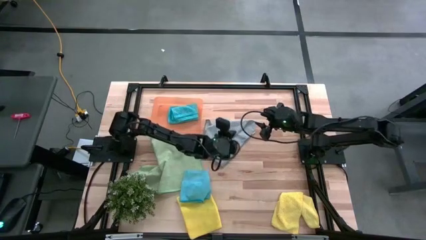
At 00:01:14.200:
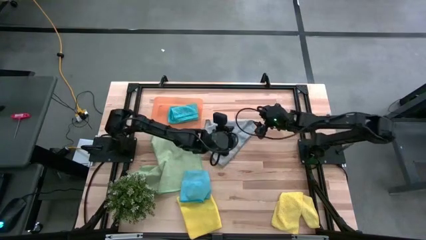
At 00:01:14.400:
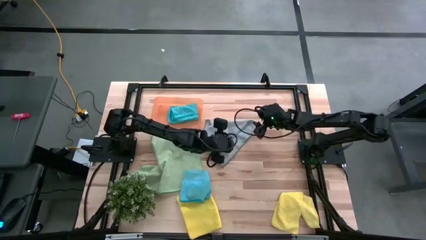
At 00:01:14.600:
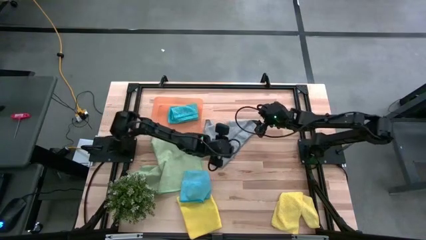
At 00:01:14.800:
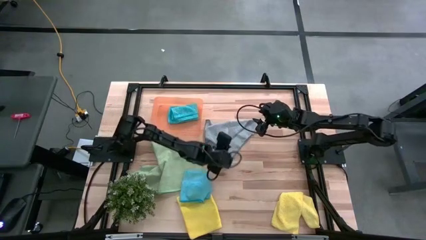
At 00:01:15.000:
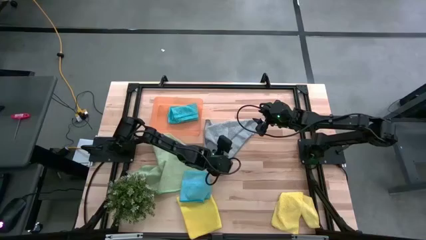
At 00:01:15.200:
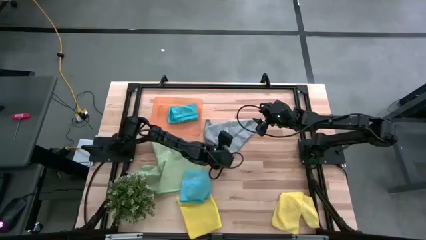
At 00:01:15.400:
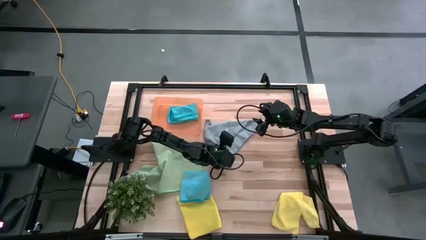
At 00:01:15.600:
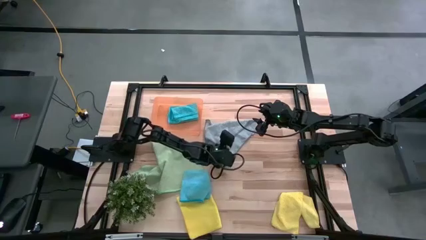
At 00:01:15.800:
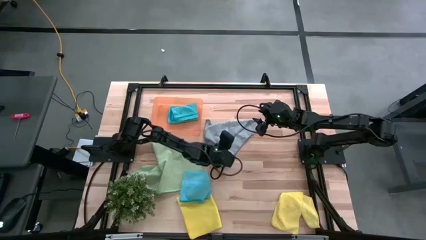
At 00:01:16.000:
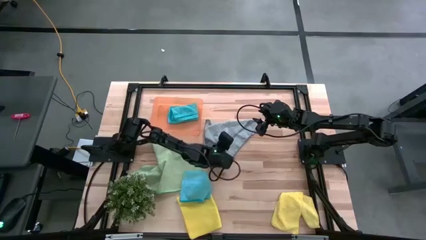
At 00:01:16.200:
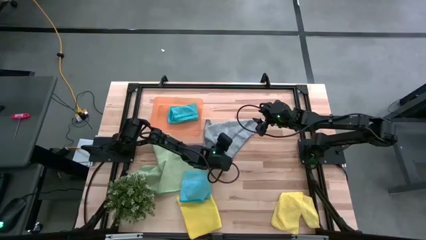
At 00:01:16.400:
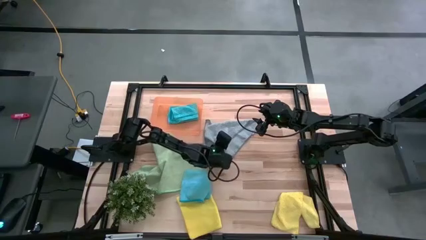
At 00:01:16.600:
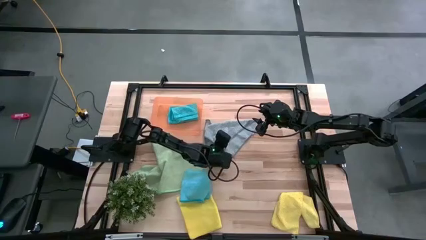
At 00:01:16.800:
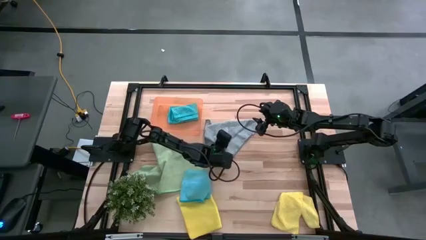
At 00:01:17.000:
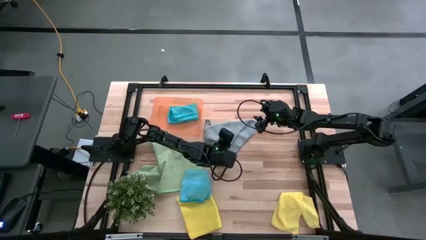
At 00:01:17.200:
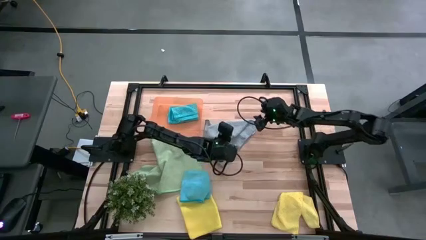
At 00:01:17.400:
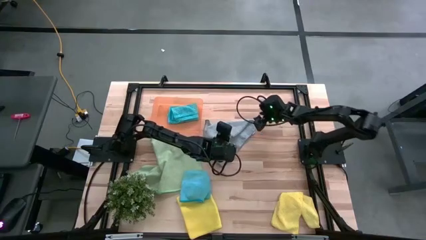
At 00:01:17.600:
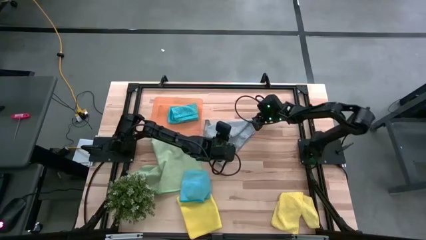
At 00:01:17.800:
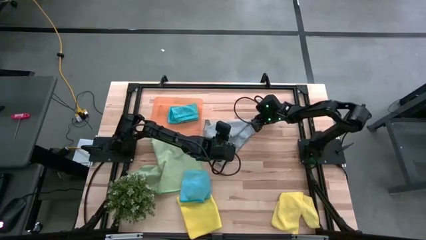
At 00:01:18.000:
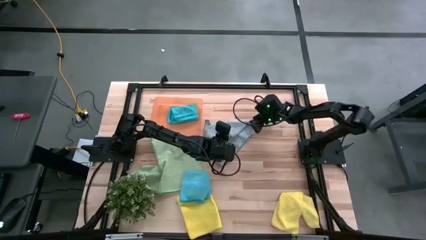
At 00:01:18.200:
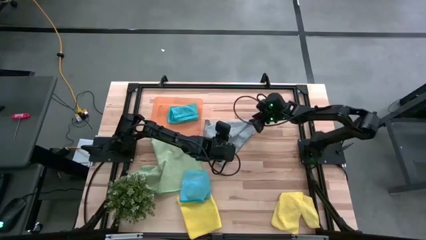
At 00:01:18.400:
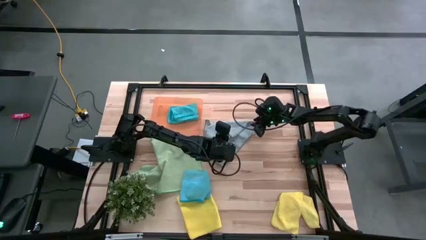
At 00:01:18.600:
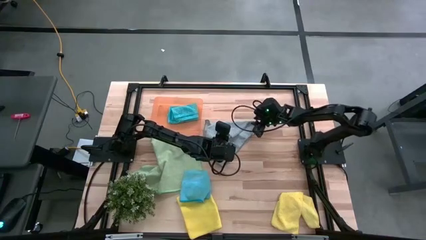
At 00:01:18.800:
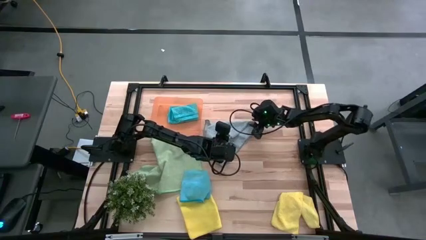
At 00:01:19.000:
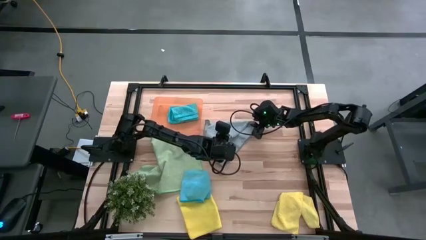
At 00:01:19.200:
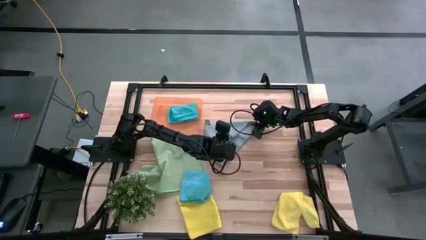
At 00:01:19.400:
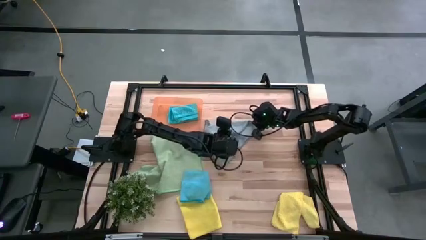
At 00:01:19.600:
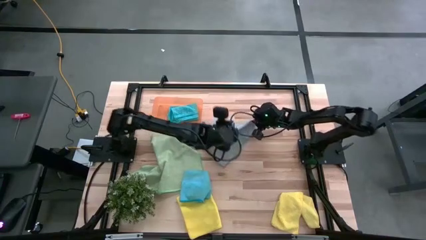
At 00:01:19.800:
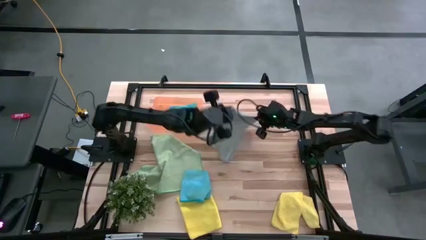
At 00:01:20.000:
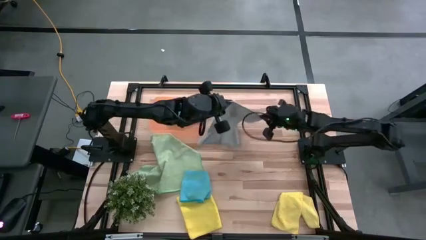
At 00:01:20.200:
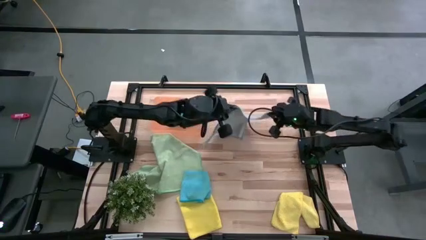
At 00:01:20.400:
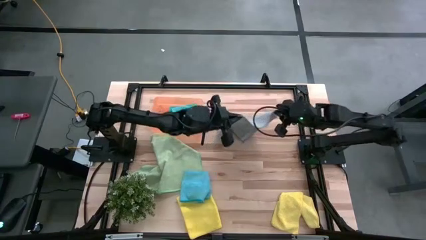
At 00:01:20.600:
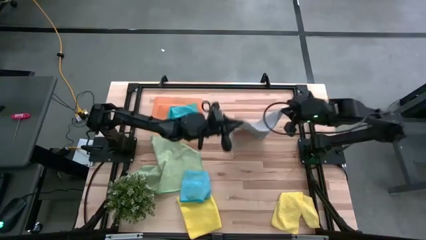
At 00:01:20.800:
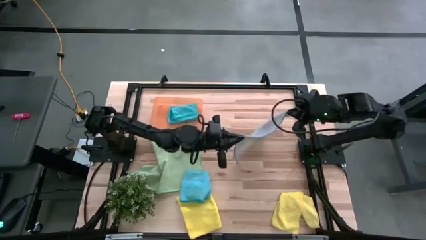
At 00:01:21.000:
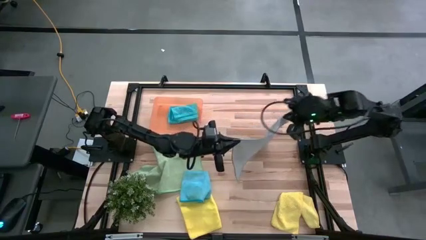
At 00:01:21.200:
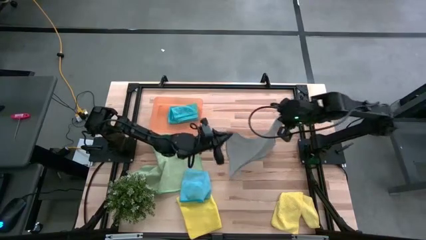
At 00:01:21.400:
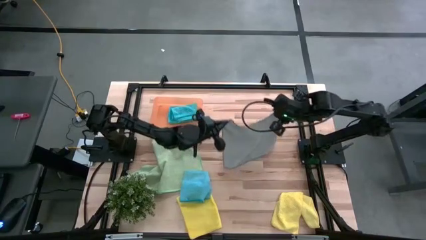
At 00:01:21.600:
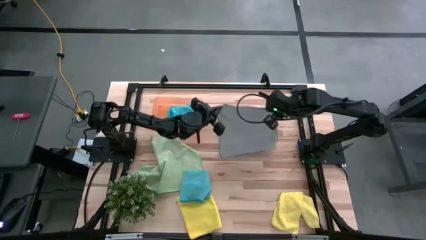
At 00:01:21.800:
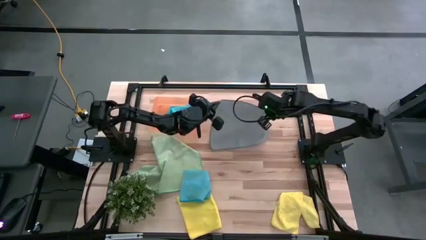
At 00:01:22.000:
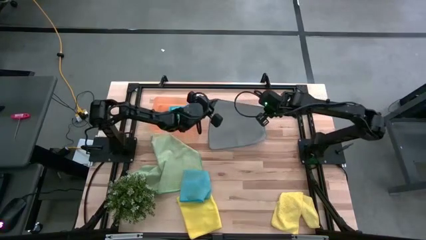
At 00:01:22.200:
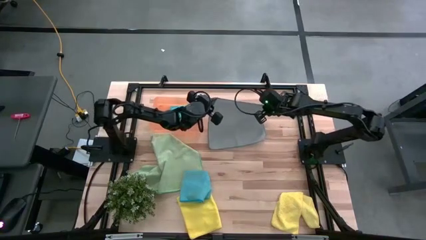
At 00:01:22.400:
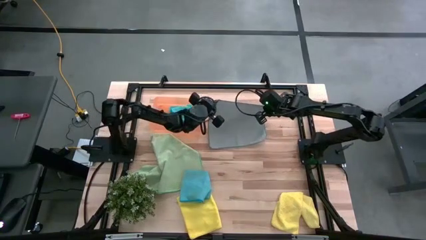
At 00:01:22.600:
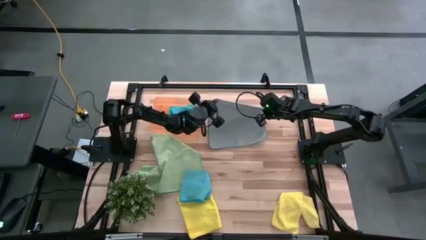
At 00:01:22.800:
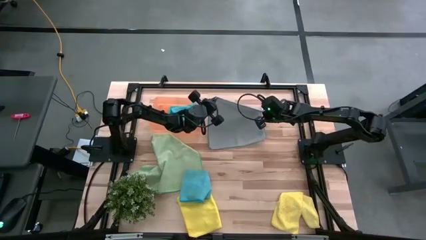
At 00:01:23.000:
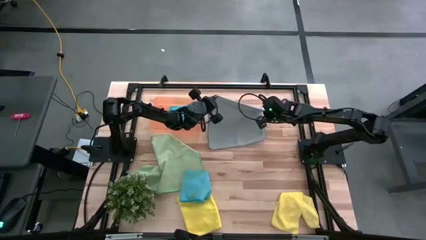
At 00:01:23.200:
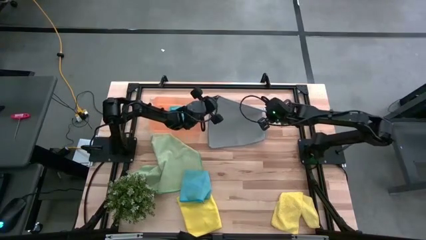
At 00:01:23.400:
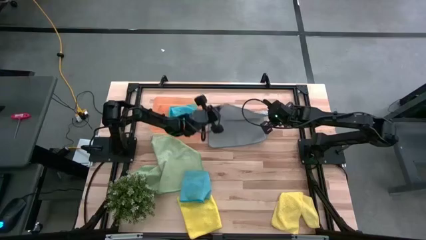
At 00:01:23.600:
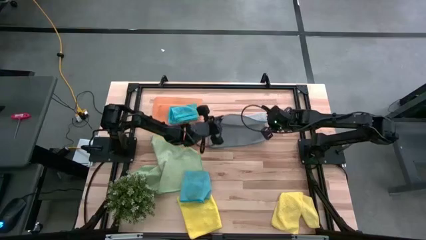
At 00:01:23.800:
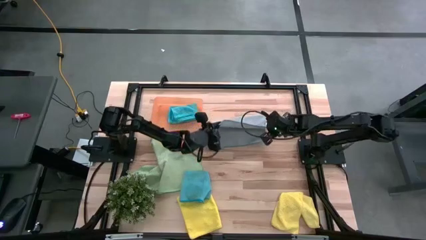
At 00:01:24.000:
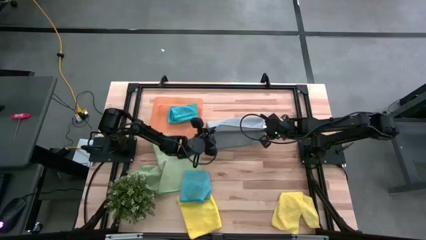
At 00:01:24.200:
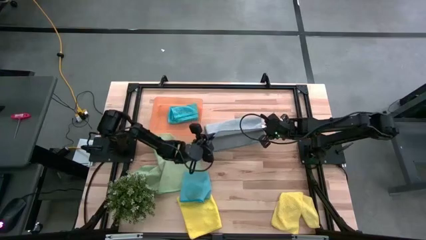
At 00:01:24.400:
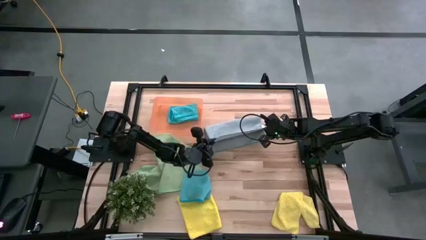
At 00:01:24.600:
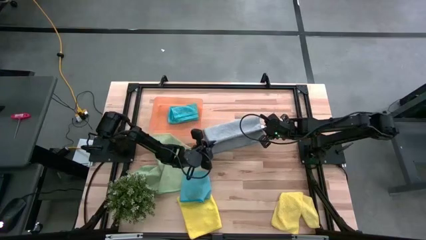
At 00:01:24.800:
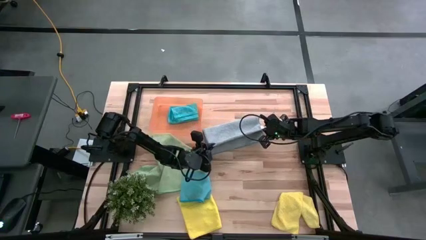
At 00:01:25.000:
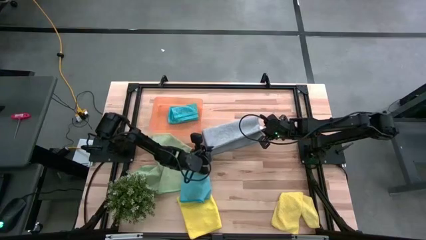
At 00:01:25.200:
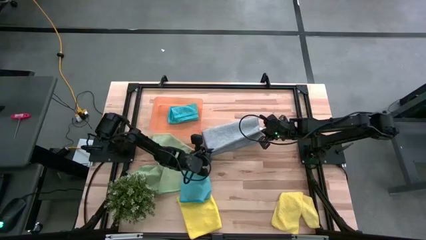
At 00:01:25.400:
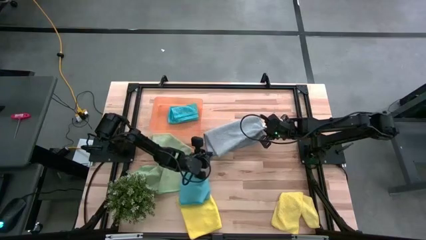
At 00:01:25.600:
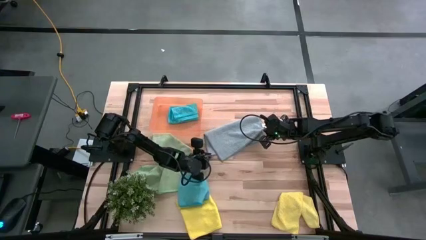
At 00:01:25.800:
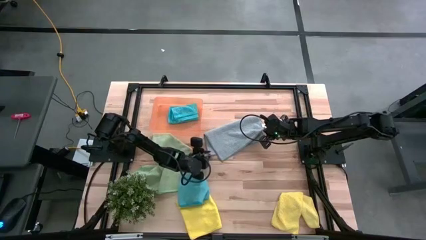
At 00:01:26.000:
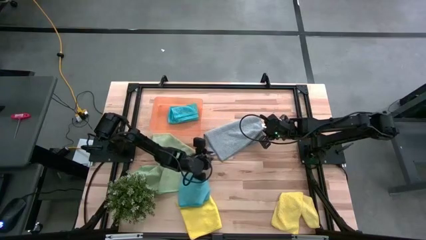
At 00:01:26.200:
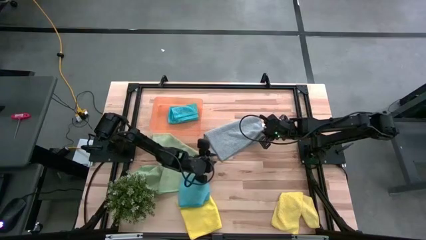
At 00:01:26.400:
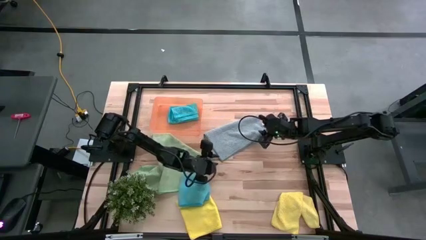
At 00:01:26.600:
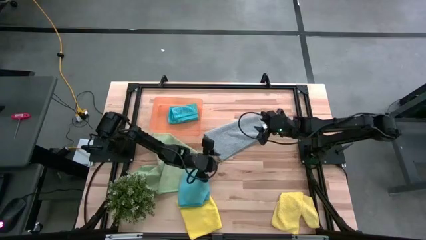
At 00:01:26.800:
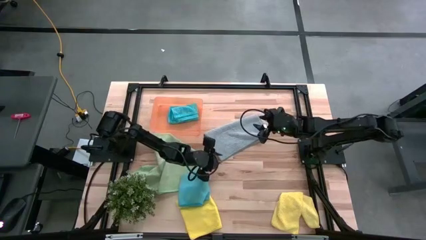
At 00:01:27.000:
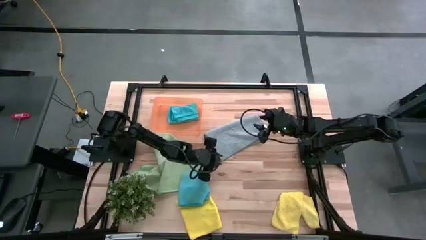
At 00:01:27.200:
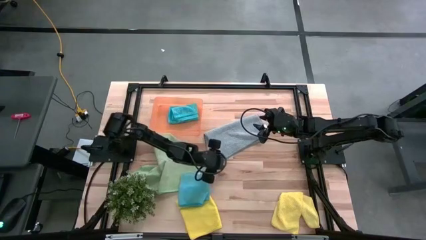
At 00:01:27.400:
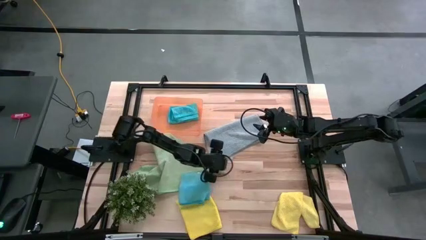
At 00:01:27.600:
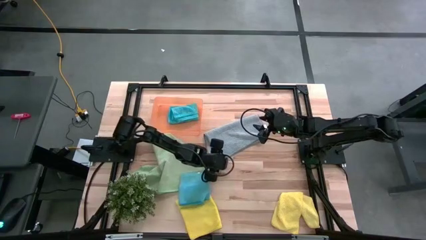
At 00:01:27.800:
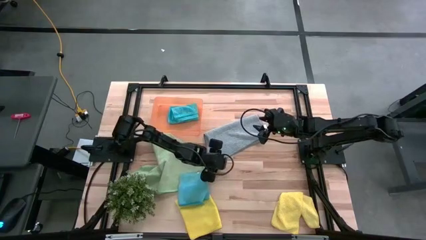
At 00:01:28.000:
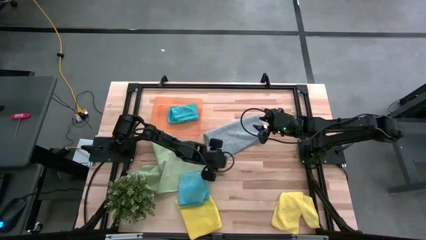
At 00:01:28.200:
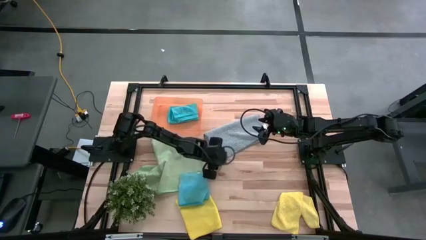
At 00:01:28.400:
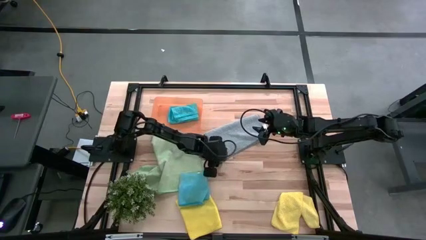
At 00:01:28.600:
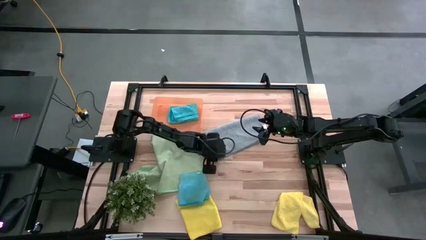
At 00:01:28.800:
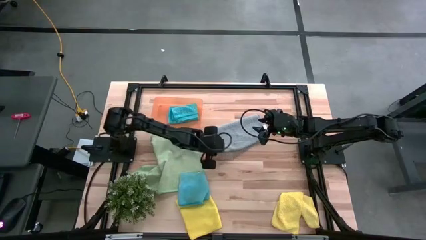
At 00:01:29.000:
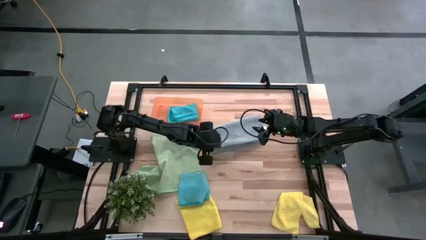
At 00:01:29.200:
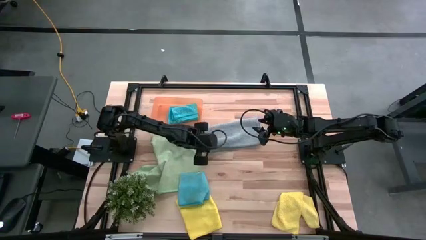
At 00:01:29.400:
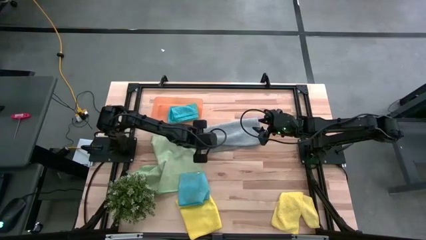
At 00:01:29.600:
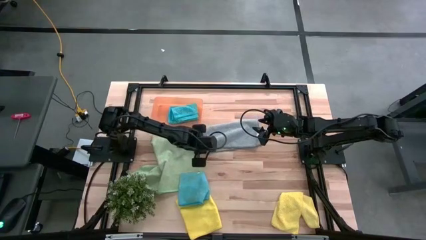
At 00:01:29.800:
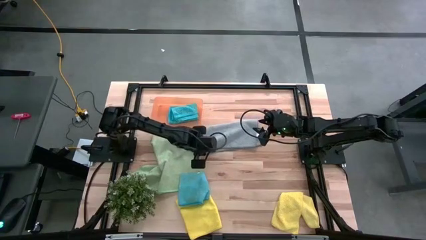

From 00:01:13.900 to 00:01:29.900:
Task: Fold microfiber towels
Fold the gray microfiber cloth
